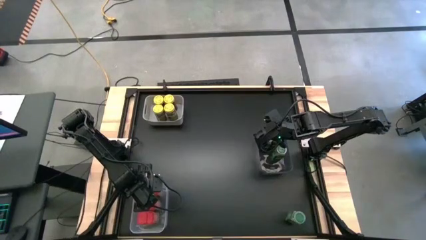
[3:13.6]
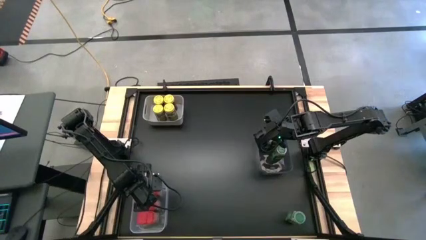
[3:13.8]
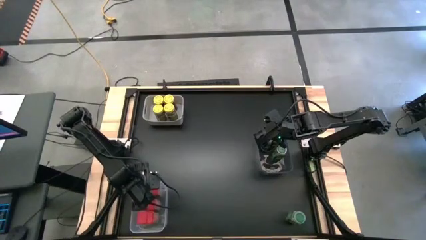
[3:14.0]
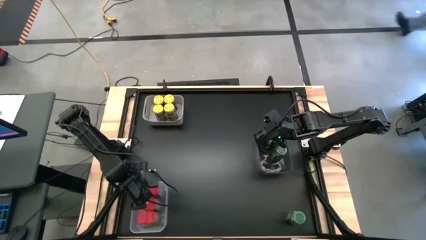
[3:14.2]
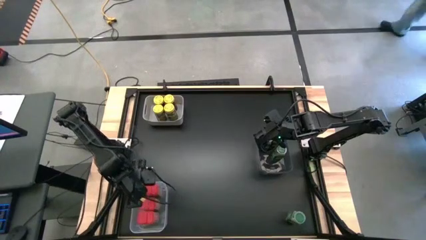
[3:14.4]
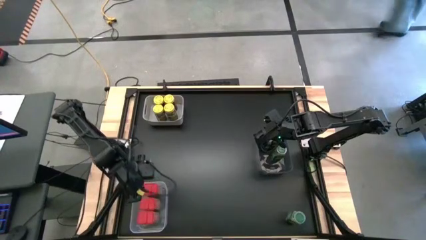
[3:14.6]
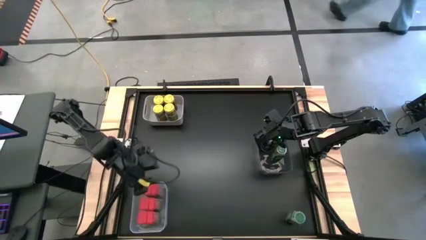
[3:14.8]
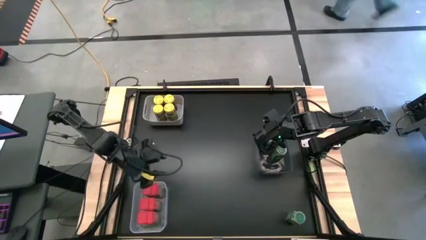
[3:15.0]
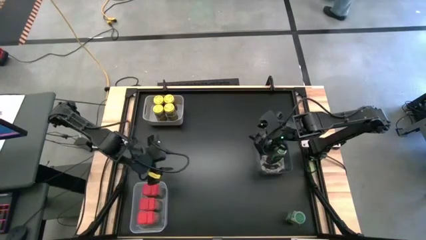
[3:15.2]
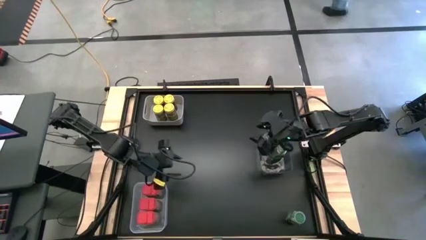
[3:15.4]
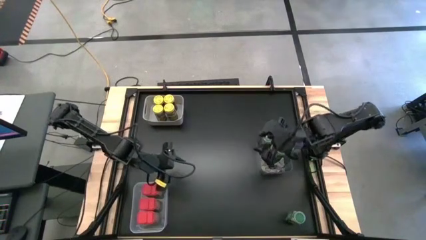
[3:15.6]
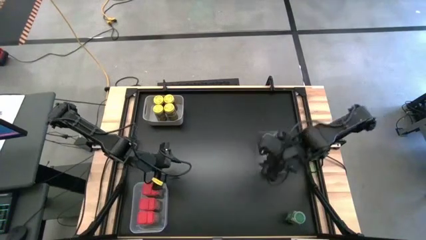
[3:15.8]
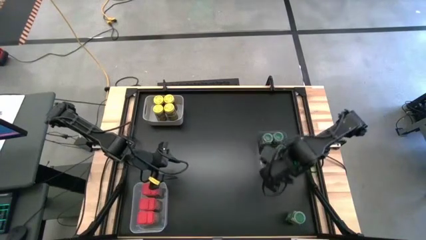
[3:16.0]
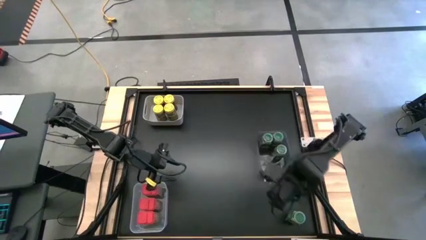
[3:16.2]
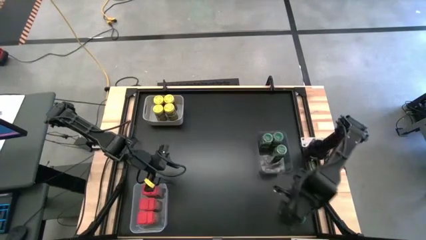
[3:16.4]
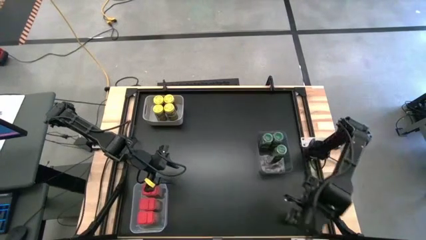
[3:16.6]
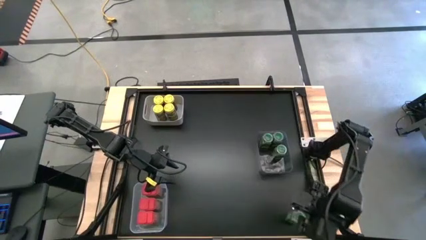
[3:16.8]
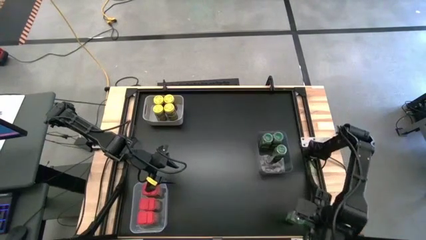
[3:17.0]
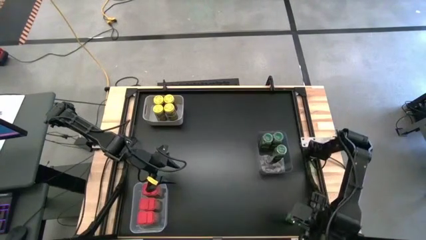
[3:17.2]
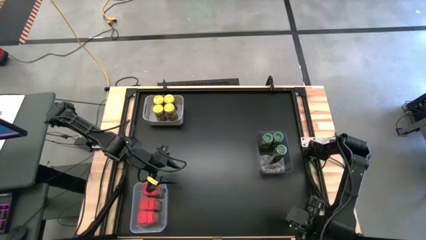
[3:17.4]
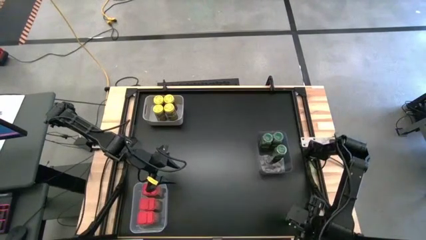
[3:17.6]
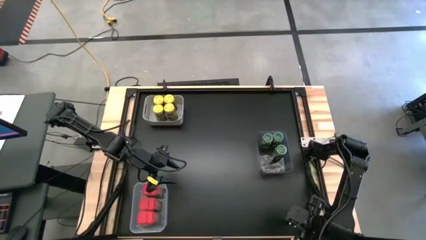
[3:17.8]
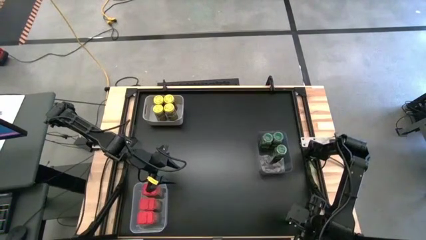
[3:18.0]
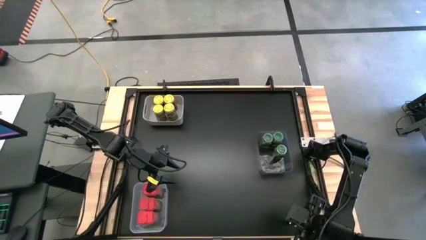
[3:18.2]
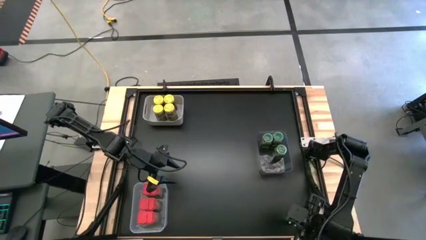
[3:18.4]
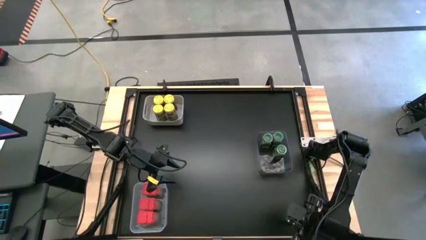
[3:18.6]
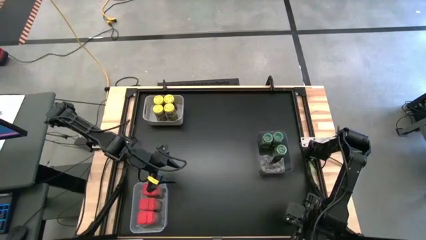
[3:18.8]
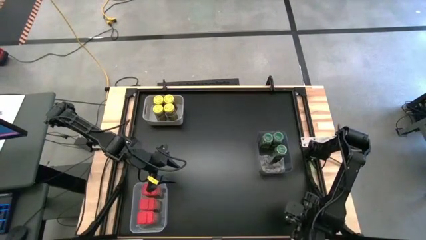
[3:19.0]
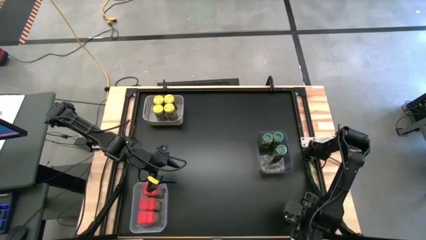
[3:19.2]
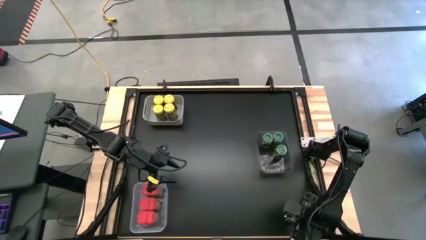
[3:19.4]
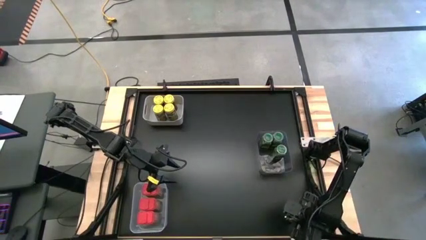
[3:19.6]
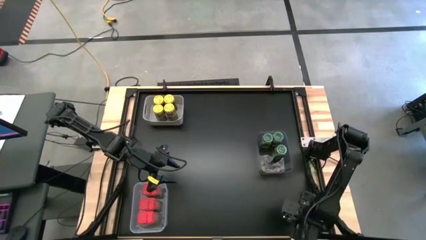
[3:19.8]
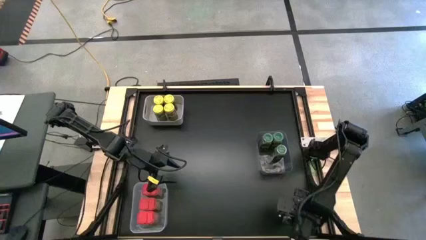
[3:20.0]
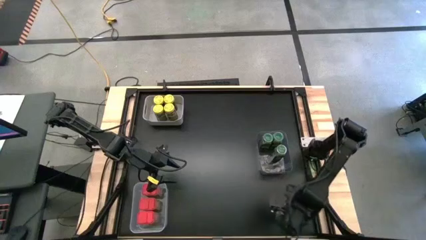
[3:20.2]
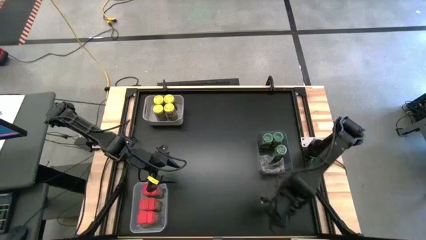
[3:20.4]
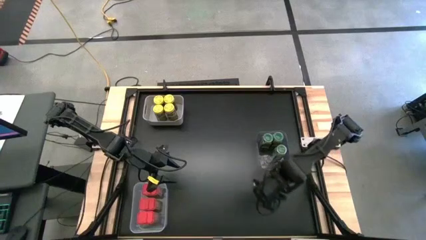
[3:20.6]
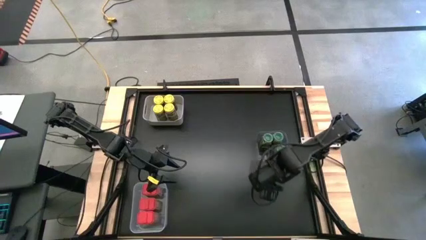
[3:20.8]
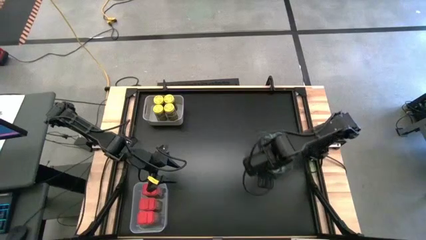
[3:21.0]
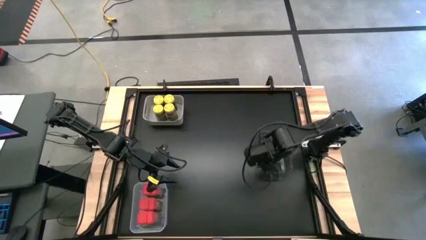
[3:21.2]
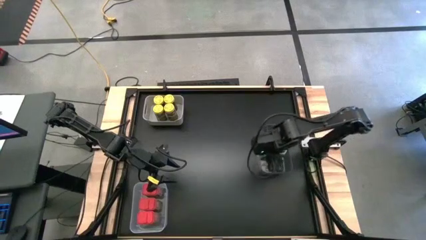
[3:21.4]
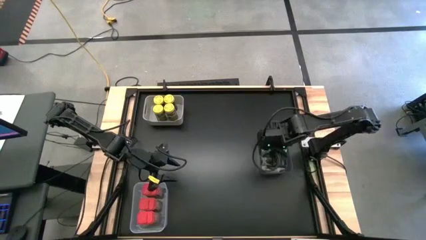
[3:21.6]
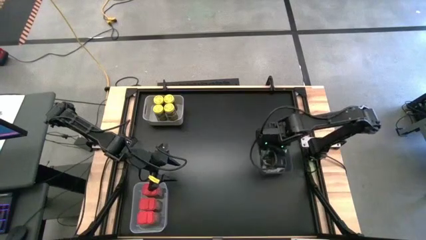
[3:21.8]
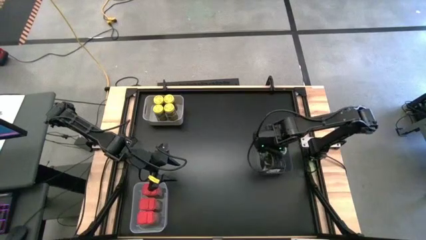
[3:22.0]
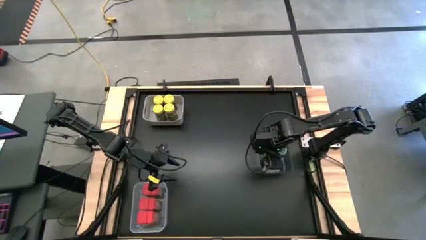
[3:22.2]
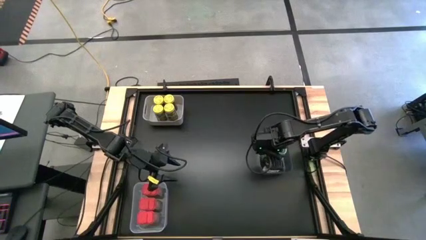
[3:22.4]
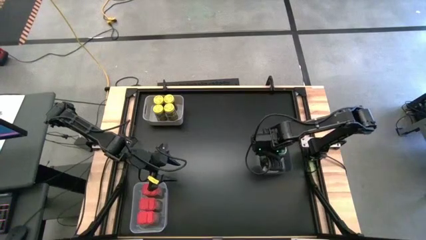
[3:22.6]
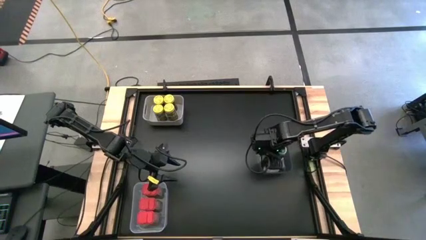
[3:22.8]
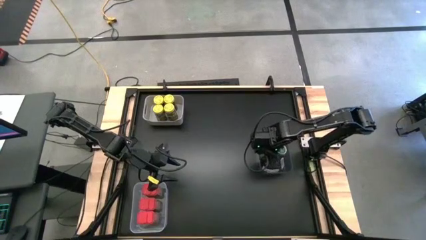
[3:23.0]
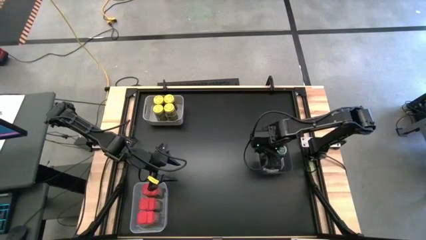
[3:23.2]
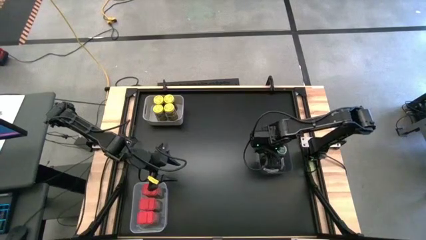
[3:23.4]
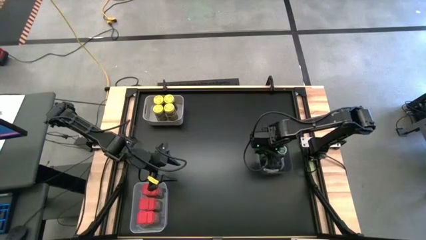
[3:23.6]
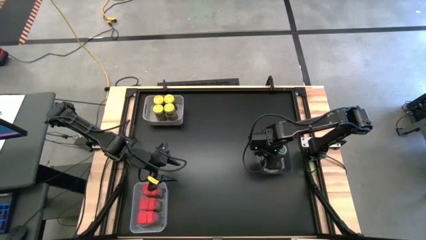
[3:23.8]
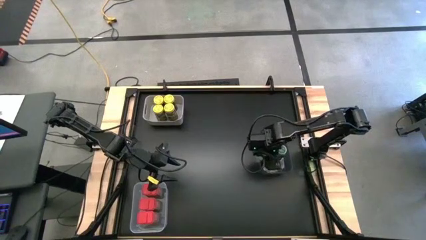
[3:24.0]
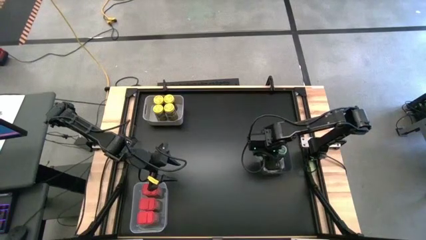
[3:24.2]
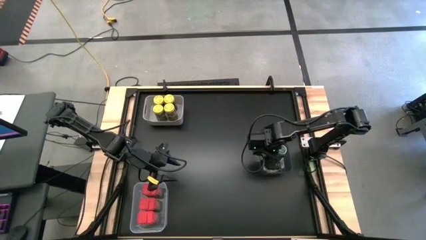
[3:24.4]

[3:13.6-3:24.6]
Task: Sort spices by type
Put the green seasoning bottle into the black bin
